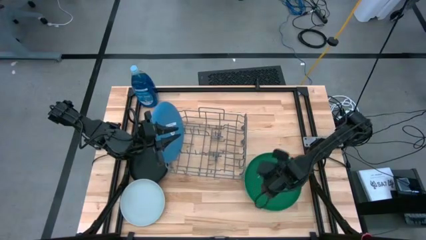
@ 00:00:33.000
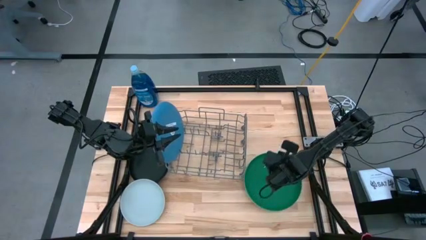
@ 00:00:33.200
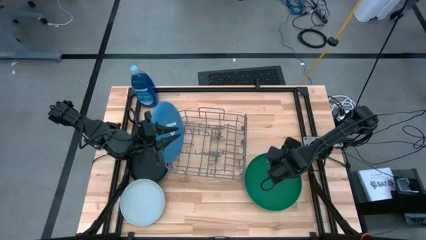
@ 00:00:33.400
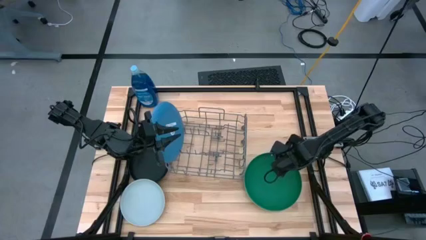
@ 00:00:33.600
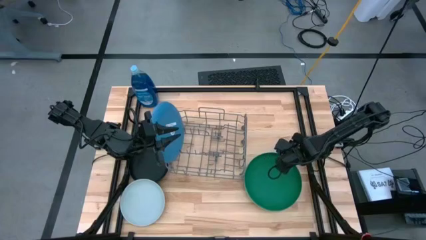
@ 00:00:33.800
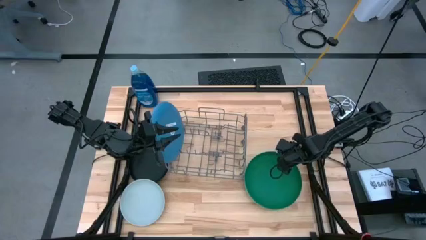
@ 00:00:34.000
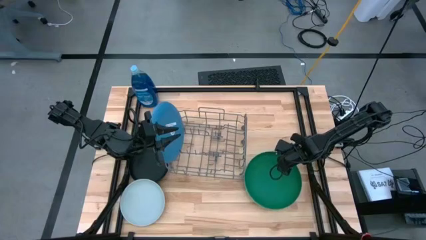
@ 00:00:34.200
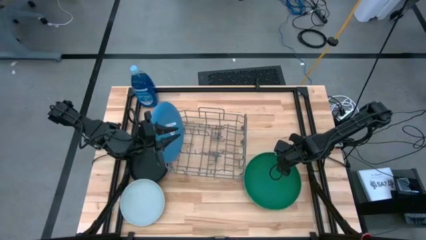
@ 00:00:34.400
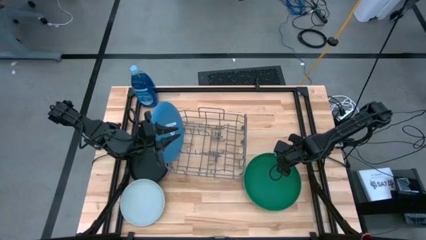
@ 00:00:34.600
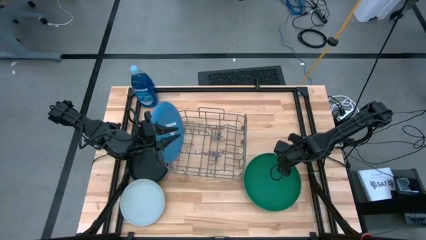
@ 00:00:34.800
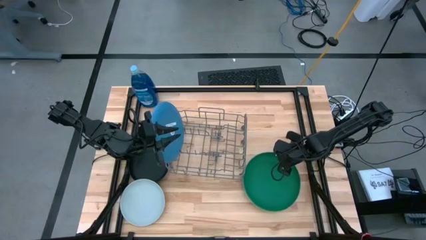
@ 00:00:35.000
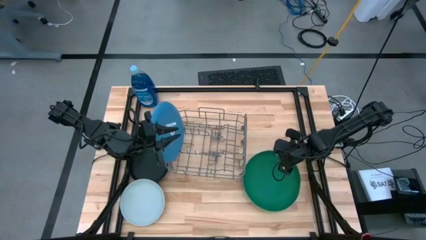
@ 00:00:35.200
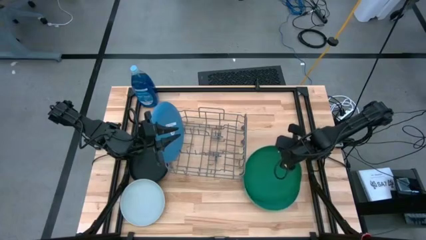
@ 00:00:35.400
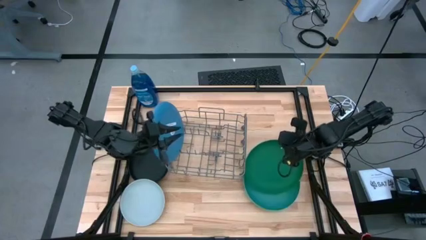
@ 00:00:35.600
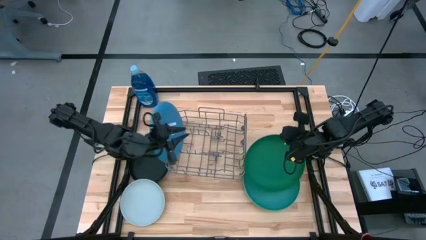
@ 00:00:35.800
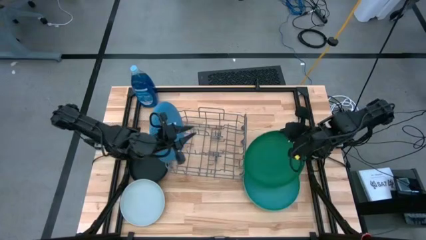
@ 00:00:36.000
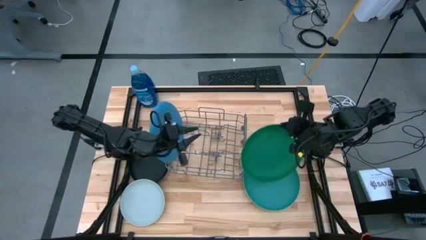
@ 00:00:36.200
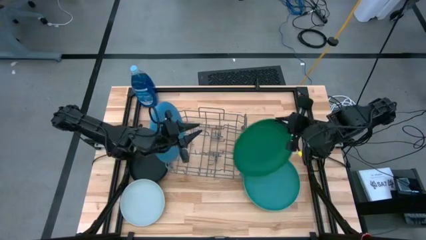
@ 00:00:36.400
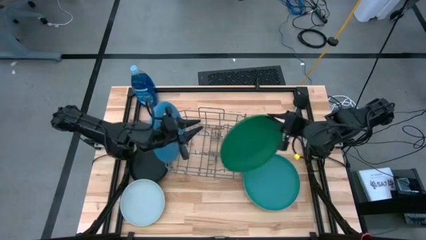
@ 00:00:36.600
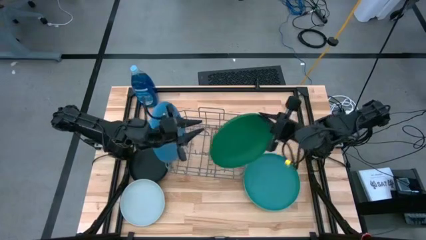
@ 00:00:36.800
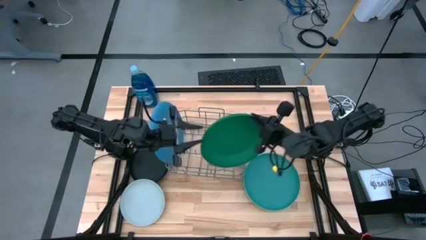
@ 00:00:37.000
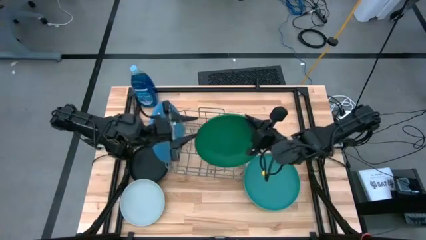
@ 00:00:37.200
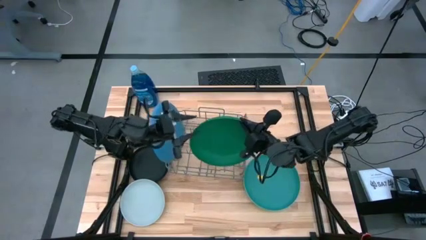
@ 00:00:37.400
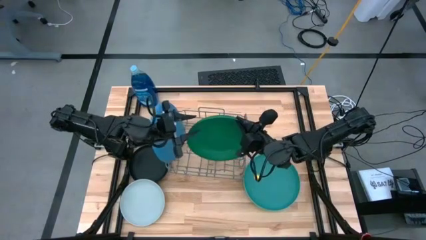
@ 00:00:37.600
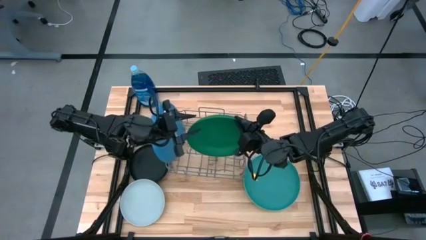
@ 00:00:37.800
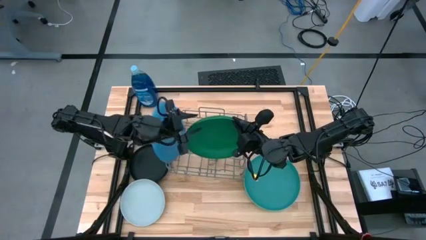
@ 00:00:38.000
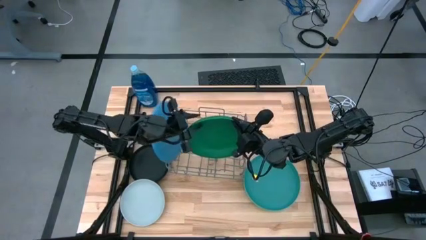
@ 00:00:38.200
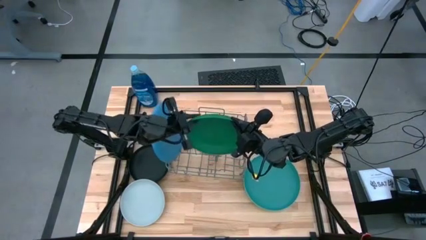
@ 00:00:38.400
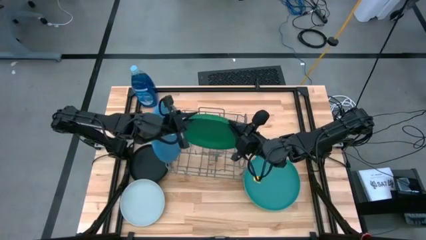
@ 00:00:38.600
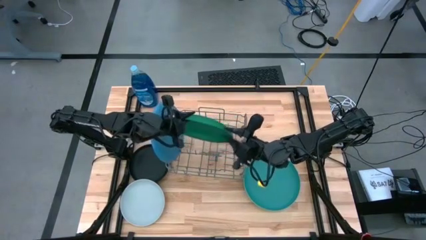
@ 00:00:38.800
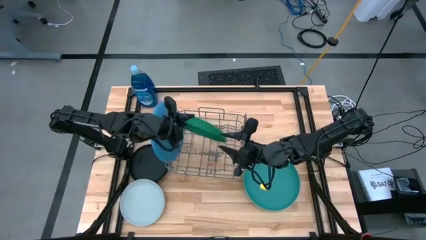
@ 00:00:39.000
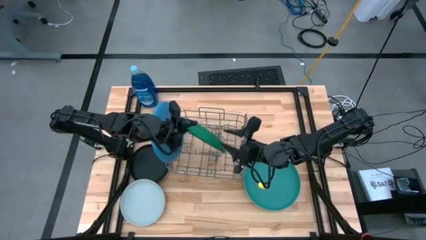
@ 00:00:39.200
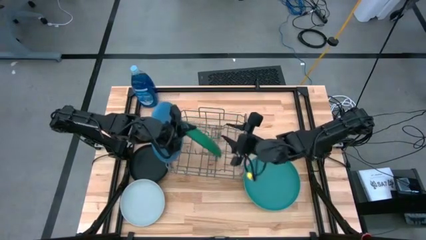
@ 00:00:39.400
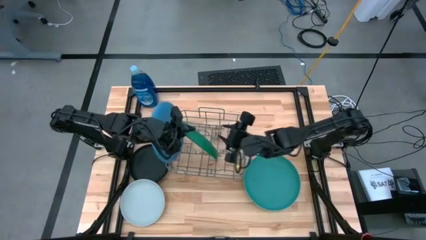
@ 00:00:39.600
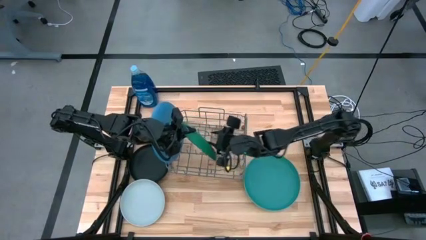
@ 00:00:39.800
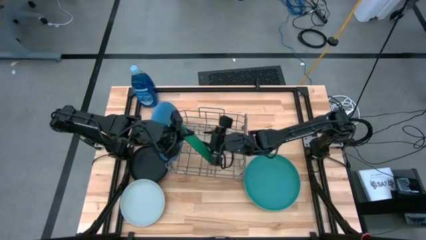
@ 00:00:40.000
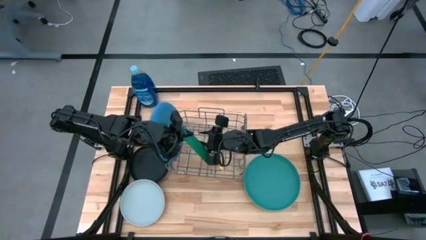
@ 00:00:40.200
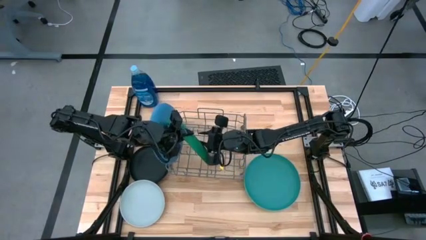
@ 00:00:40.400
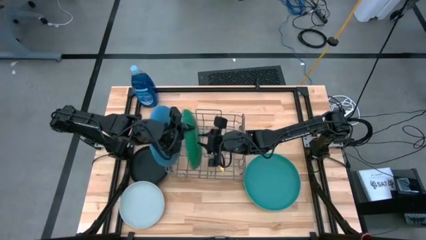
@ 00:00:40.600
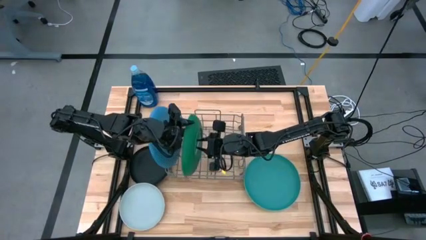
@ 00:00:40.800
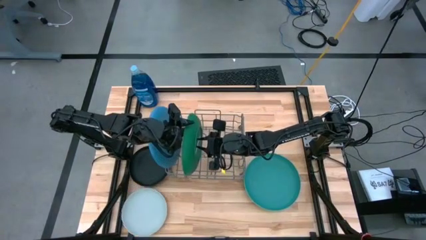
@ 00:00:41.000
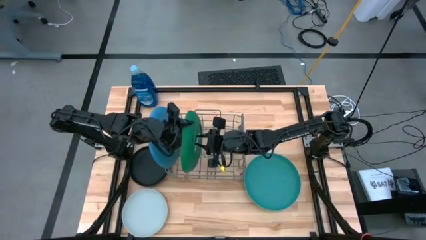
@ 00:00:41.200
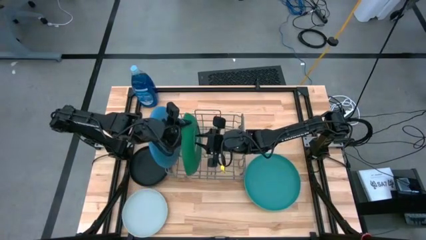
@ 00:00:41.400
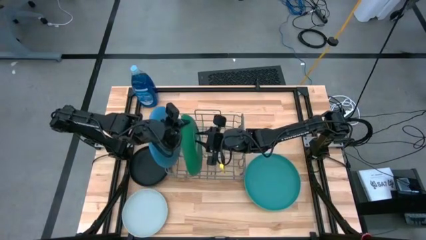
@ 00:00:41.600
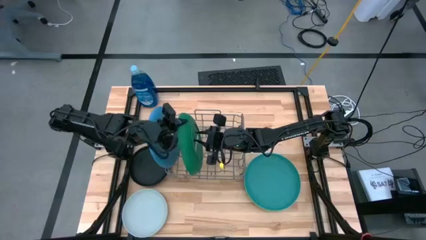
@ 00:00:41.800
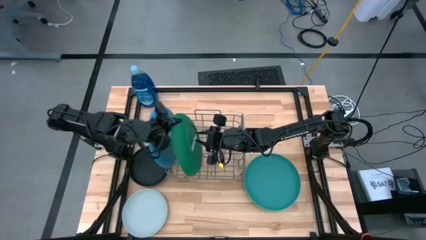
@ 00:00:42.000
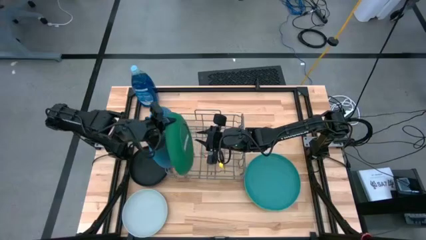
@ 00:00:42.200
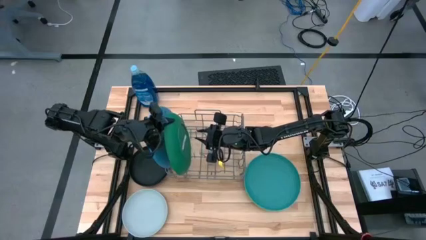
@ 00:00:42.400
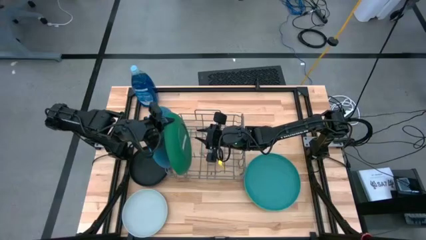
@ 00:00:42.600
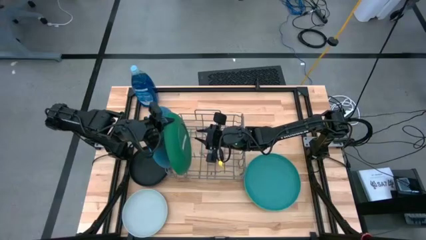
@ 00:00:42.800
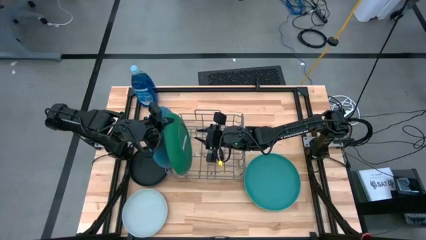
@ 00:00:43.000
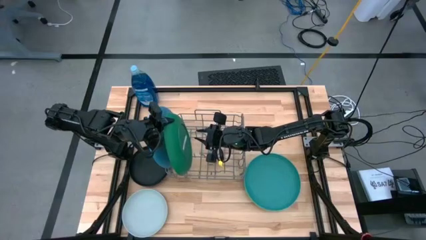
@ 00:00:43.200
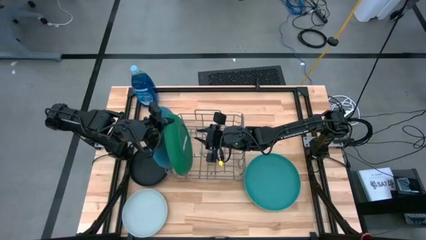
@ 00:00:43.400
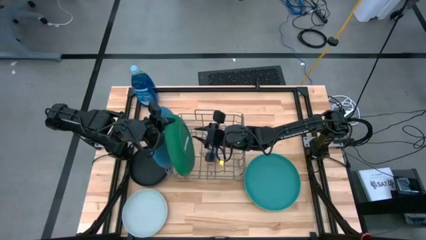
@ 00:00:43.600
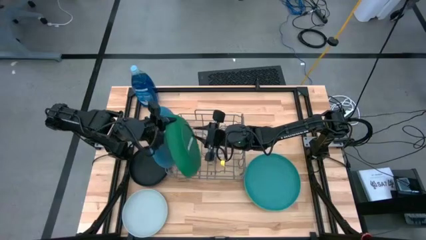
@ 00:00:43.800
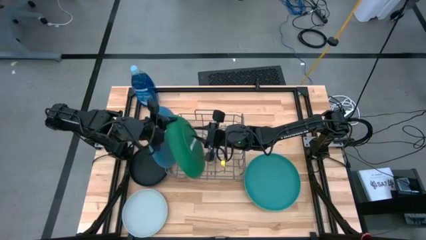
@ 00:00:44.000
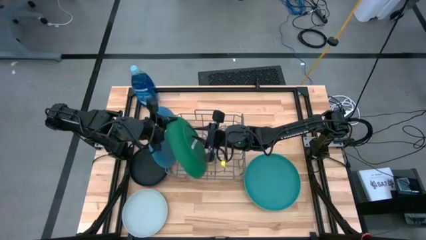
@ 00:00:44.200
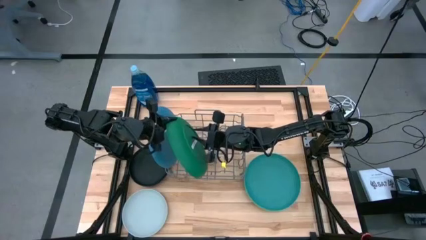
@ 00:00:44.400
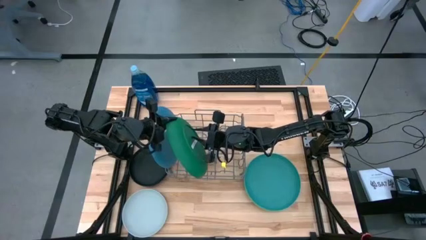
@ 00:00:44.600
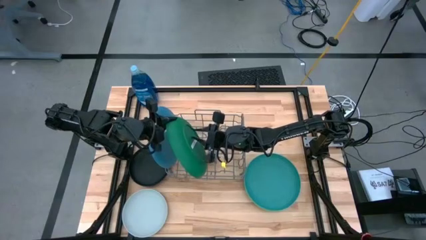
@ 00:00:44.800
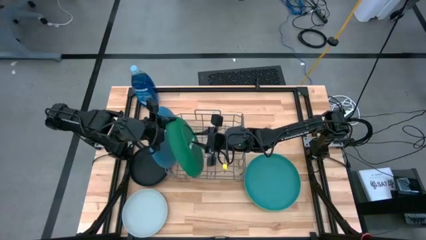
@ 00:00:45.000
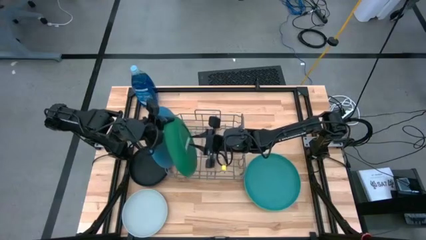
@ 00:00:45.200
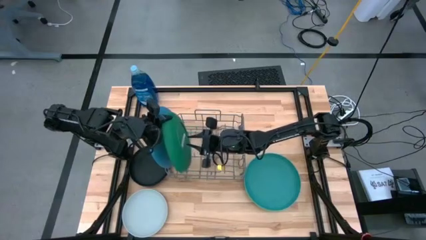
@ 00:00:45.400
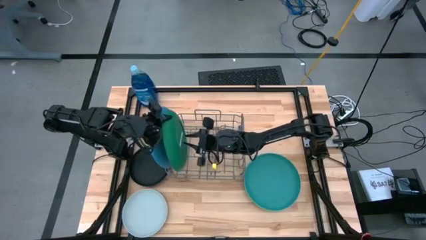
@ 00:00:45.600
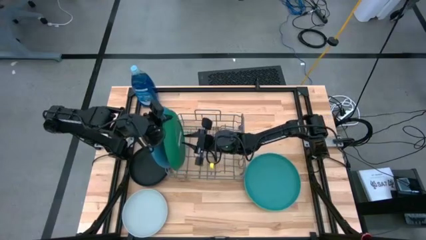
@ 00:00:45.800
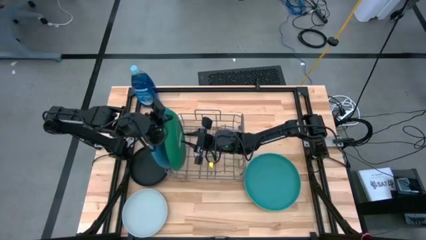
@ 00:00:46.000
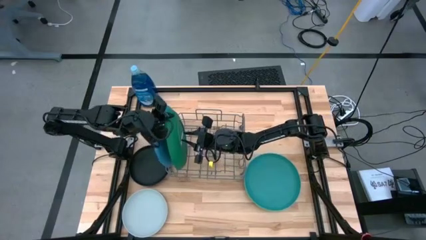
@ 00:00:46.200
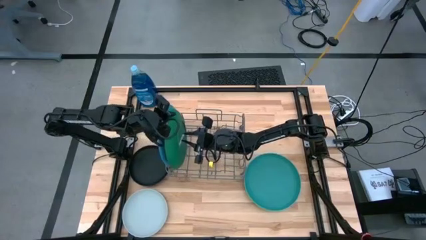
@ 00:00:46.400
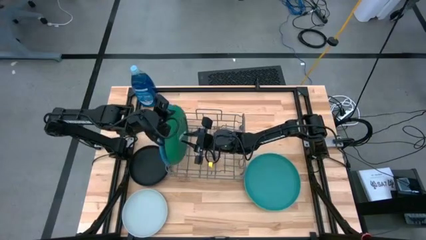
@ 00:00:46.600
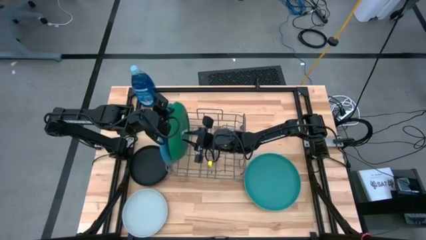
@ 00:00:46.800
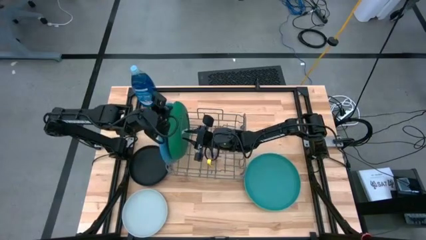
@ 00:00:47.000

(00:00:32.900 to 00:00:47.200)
Task: Sort dishes
Put the dark green plate into the gray dish rack
